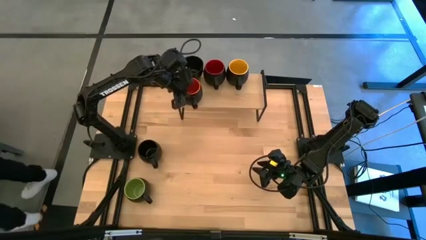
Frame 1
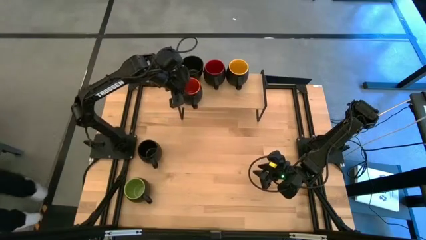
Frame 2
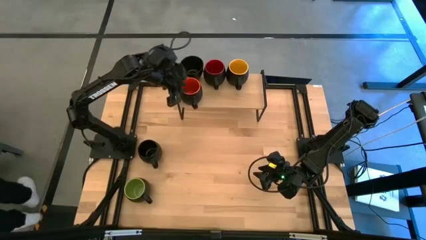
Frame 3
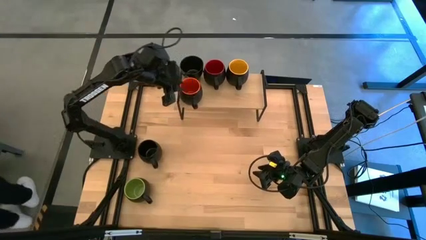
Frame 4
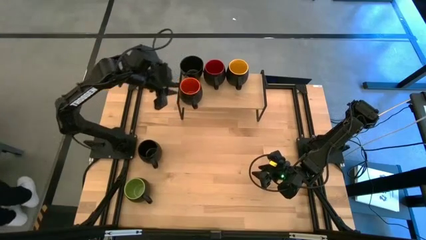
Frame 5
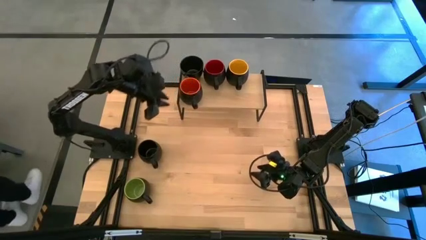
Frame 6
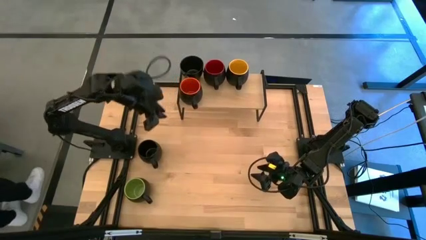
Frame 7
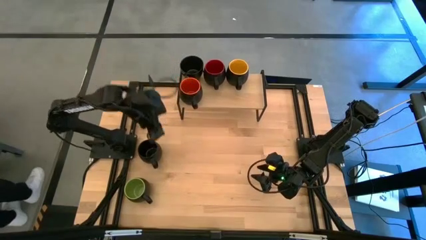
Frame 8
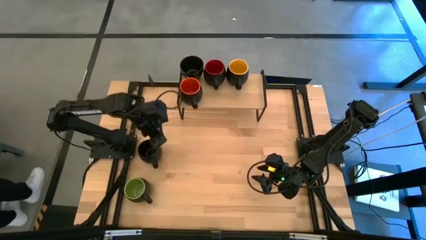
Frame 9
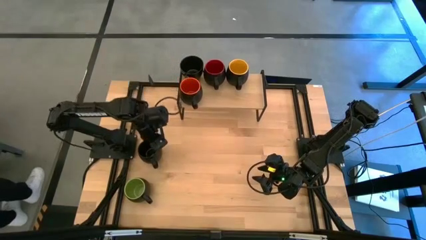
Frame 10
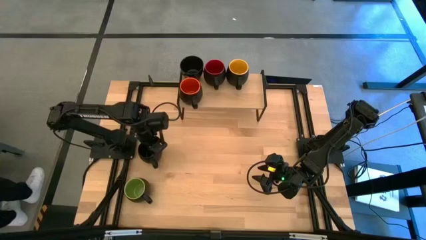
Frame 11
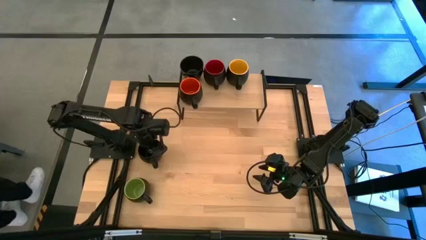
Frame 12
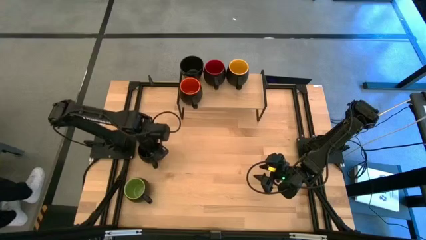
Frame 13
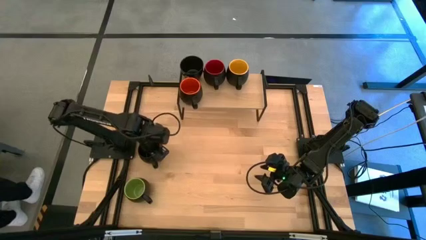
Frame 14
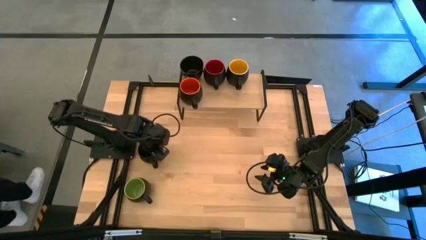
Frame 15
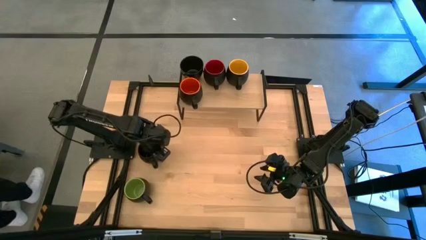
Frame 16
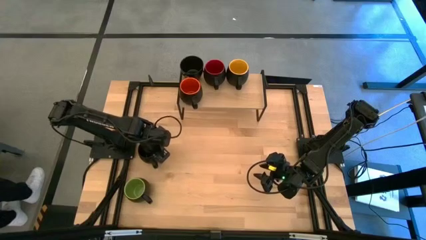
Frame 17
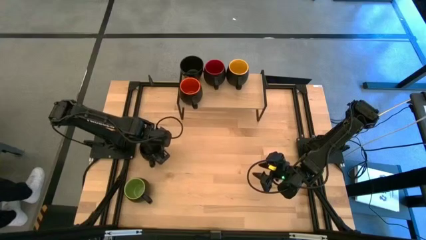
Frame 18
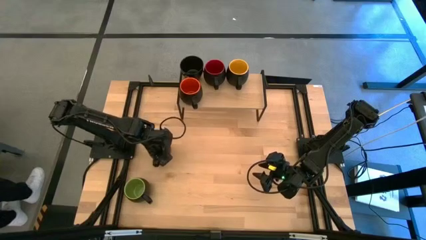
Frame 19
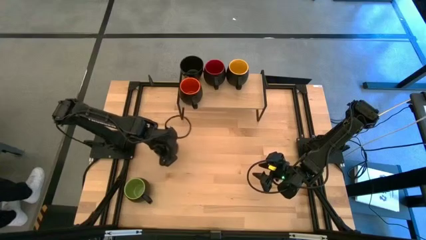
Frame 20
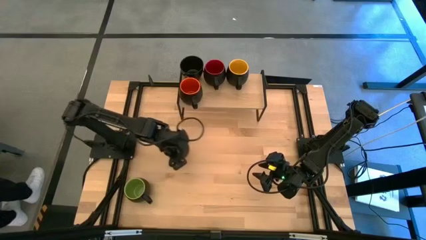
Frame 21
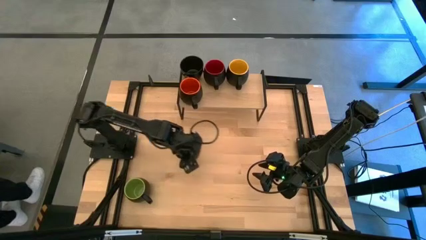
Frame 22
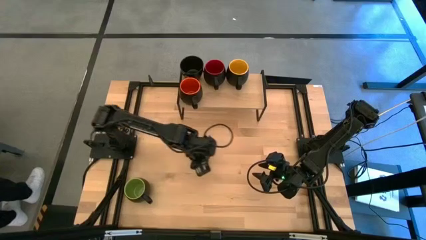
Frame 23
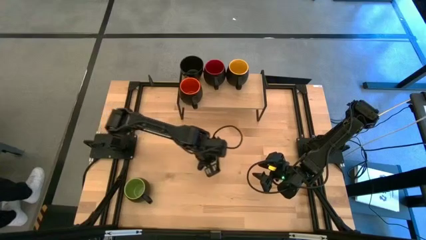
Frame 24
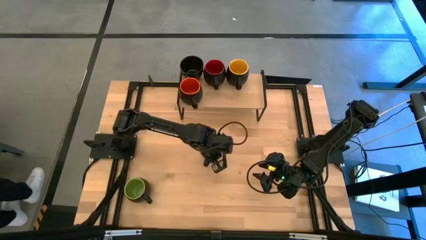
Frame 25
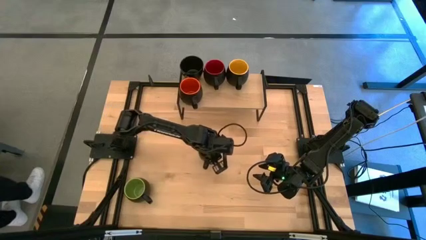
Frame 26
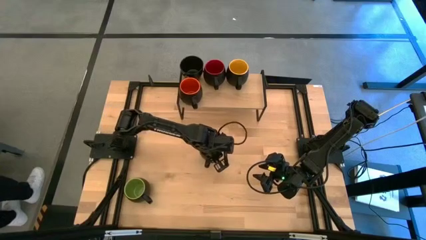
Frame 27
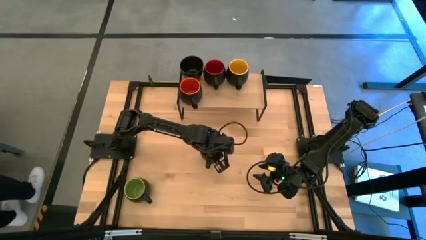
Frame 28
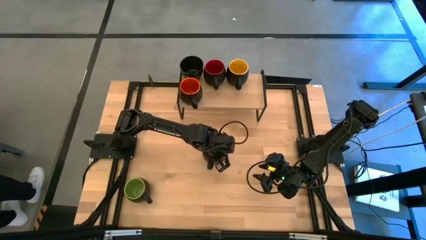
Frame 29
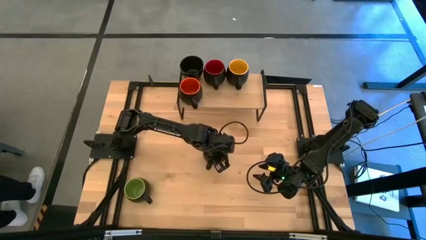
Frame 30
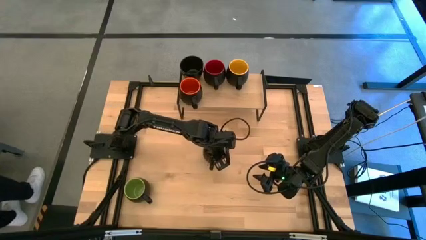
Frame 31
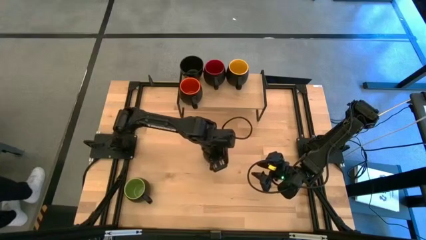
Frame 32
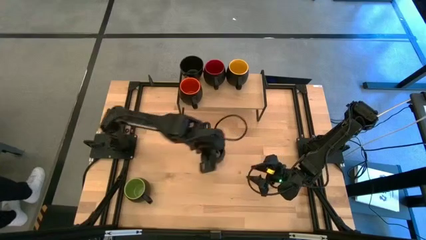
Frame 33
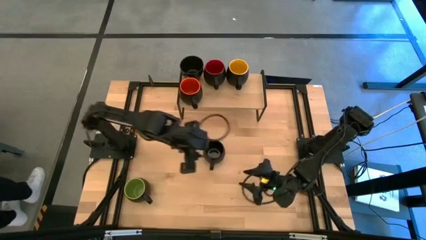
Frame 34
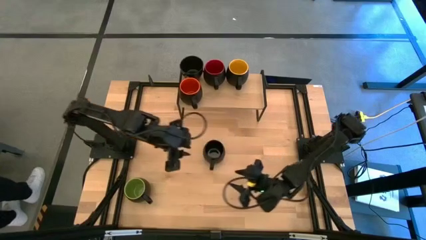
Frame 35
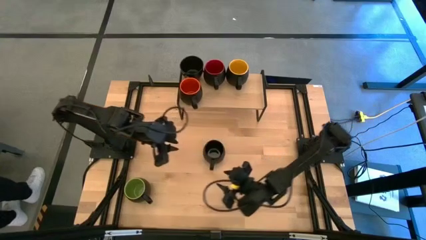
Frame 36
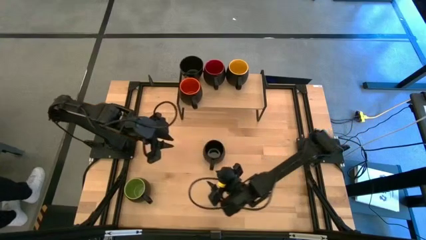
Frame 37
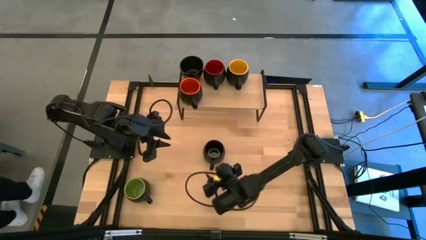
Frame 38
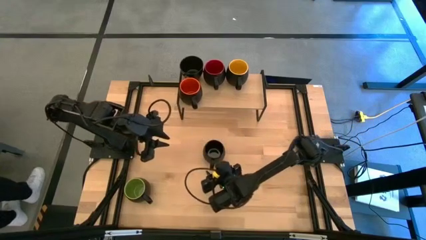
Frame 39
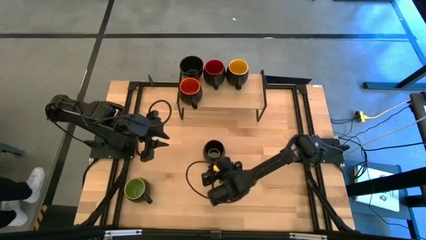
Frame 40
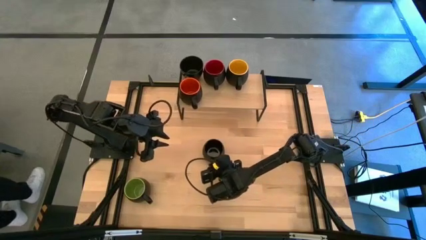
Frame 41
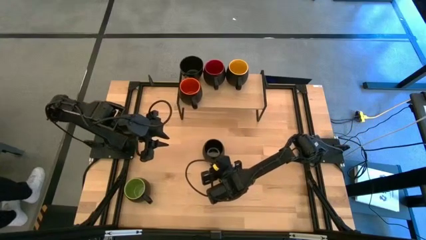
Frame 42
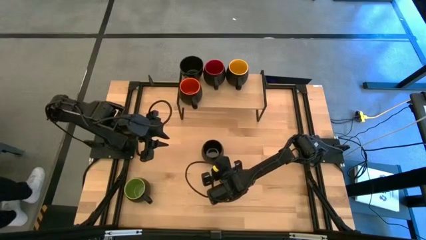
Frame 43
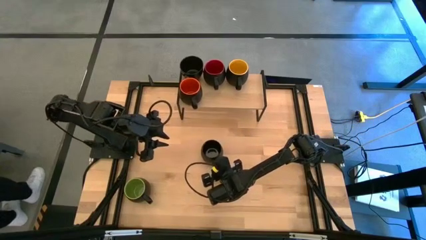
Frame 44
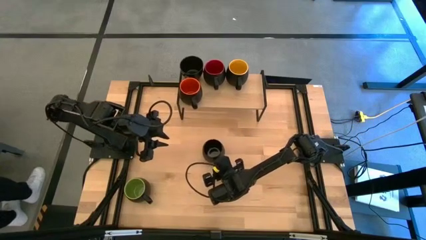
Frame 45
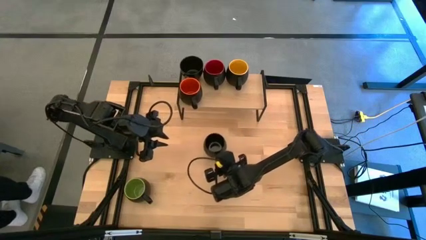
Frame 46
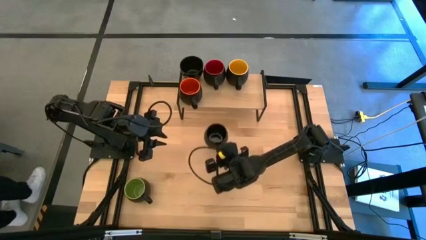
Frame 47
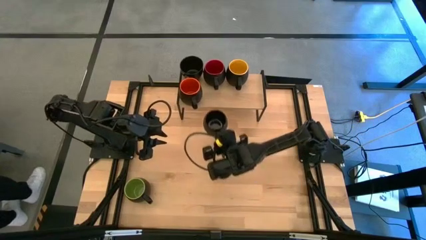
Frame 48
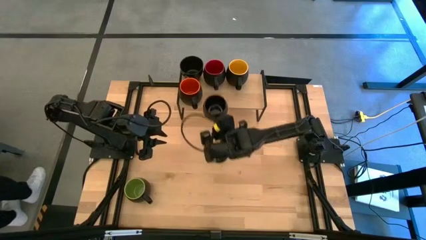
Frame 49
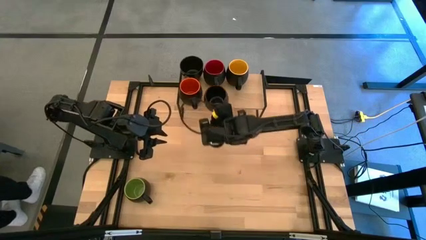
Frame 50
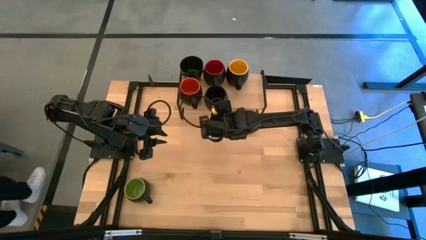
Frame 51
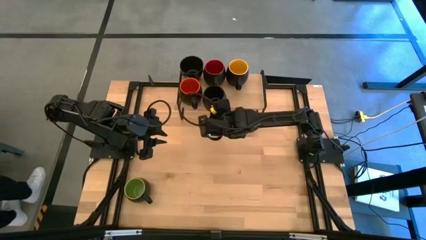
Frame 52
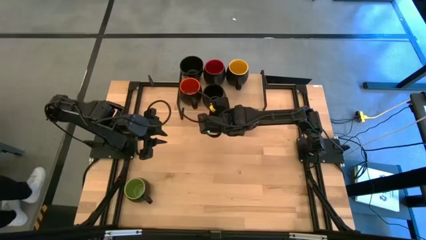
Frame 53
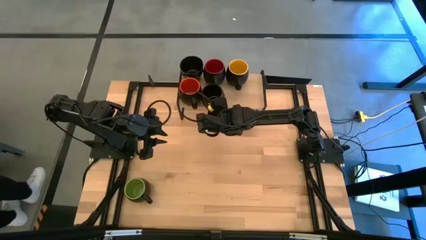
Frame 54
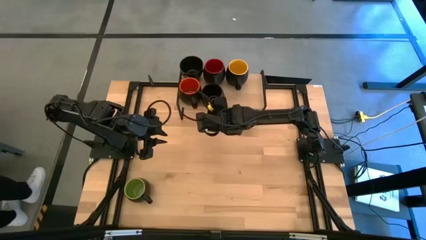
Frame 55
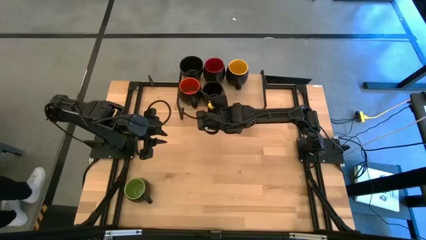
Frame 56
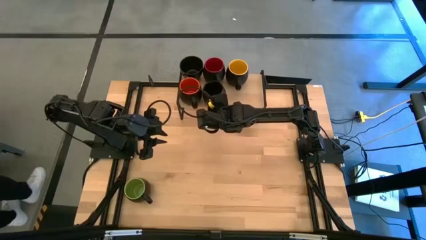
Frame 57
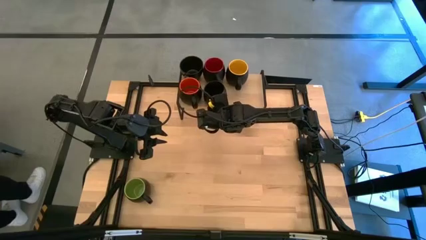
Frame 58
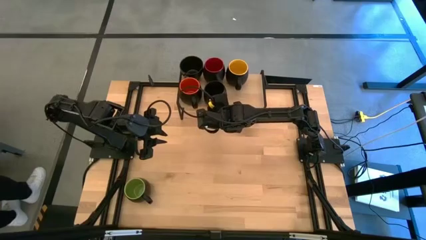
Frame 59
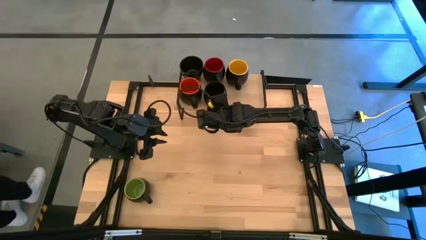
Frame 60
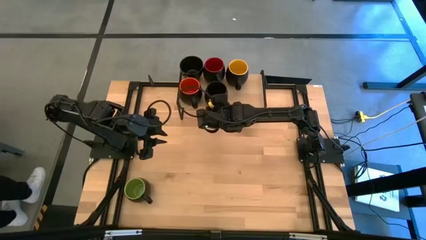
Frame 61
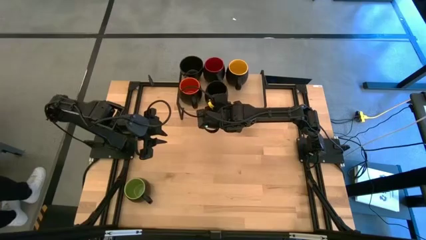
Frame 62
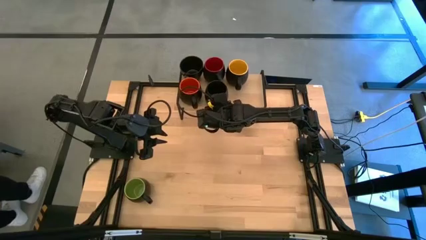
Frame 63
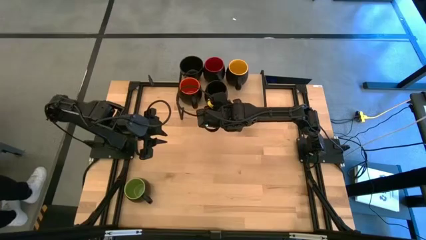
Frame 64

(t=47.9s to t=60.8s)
Task: Place coffee mugs
Put the black mug on the shelf

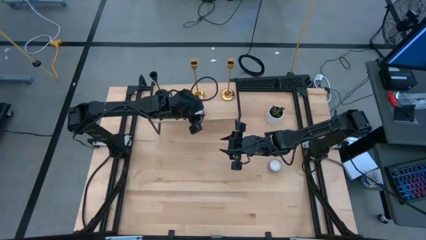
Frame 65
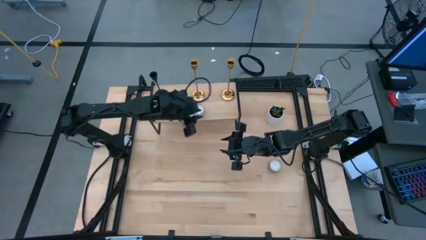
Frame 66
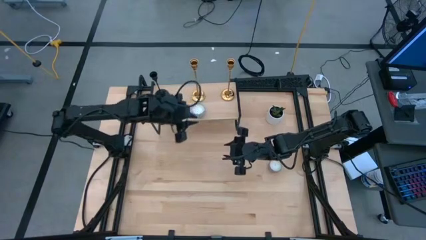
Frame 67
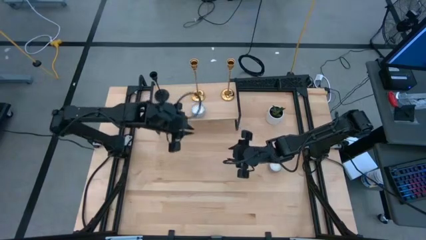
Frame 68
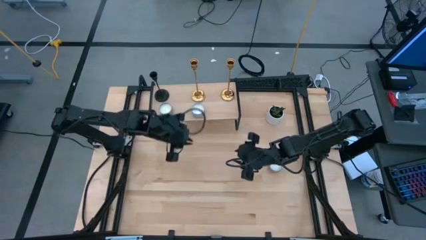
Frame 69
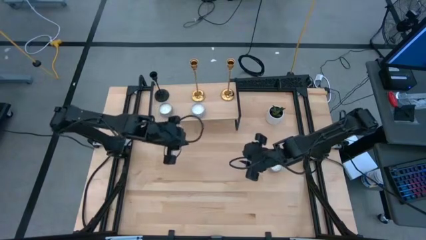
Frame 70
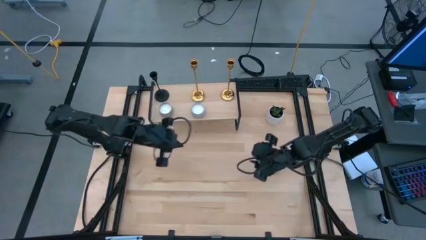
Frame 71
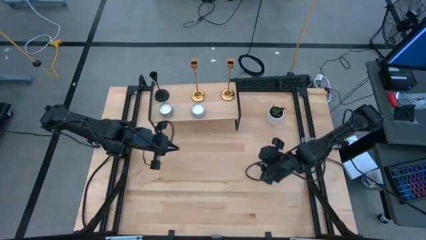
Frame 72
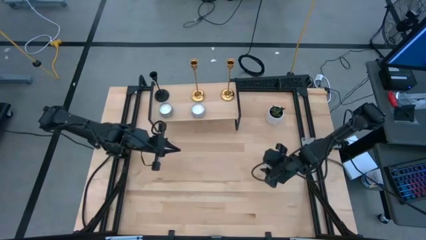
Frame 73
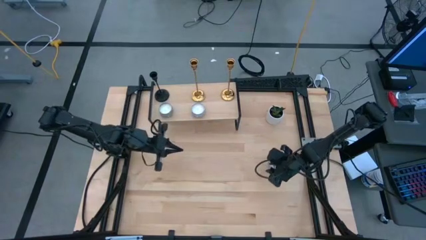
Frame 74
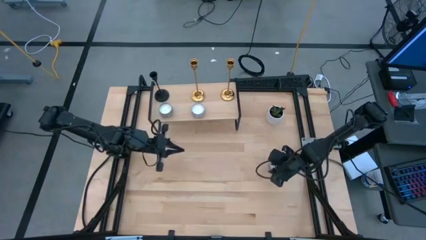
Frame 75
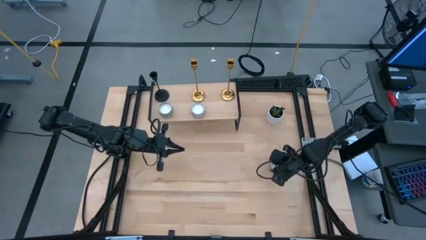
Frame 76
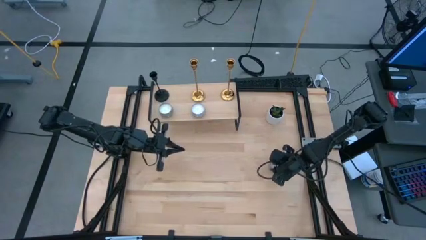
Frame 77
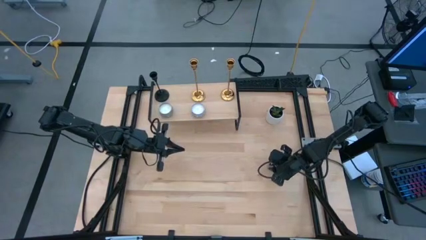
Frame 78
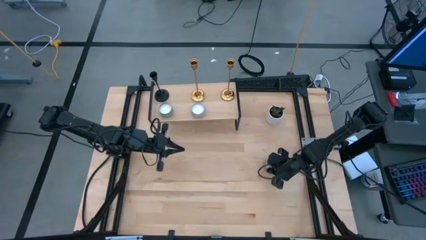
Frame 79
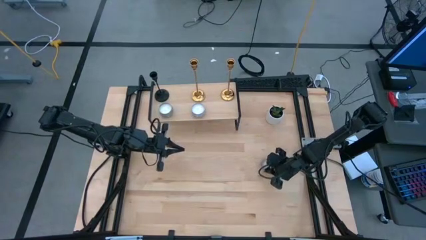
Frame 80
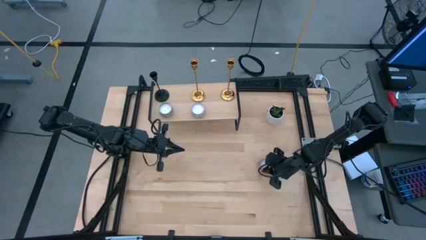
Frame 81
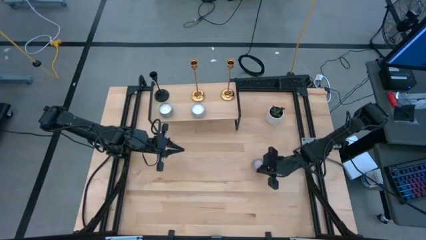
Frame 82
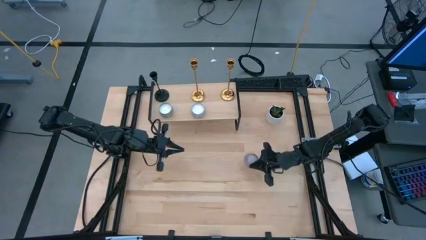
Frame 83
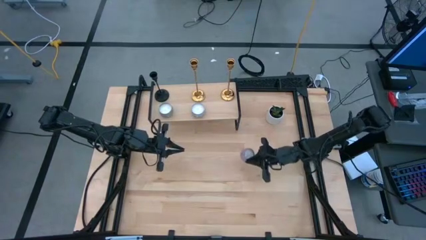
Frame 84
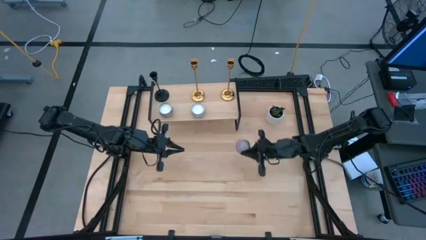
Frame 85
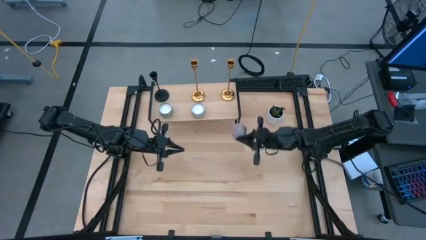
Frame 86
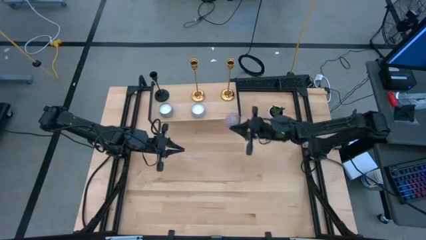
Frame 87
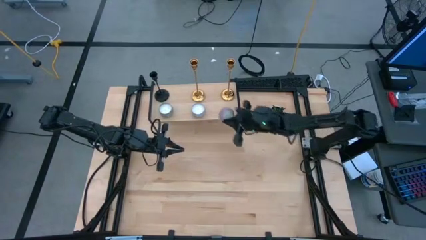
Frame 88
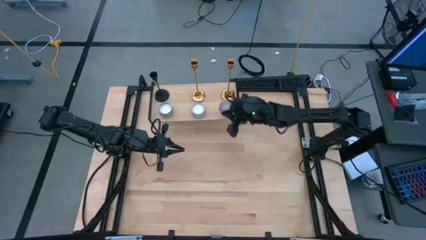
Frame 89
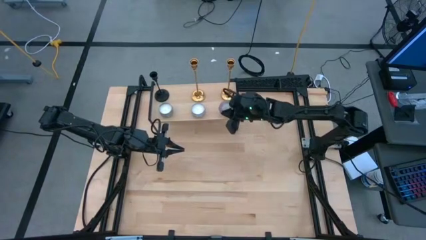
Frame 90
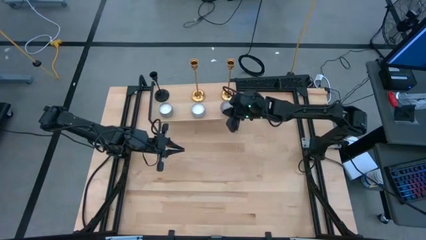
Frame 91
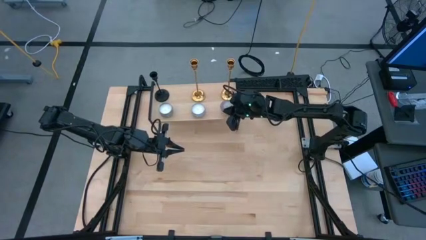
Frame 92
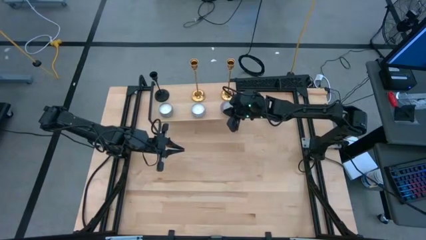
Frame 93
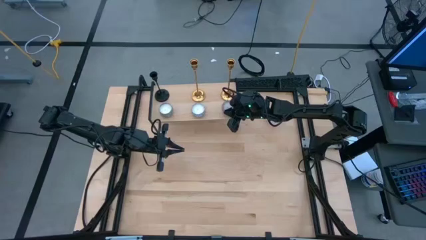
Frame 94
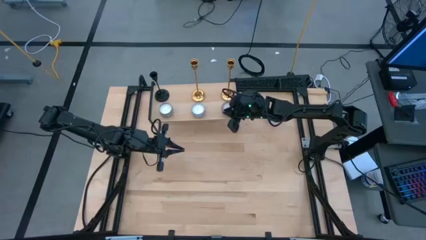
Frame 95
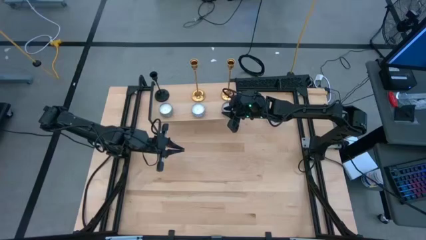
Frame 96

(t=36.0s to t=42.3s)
Task: Pick & Place candle stick holders
Put the red patterned scented candle on the shelf
